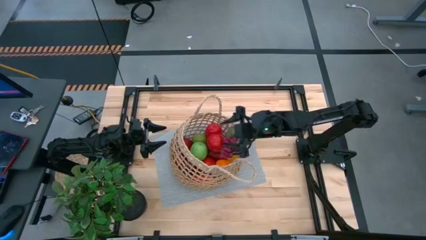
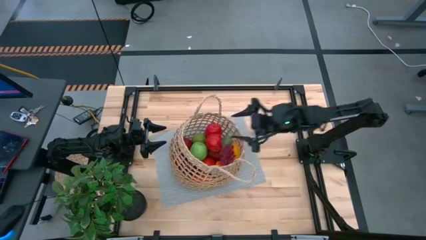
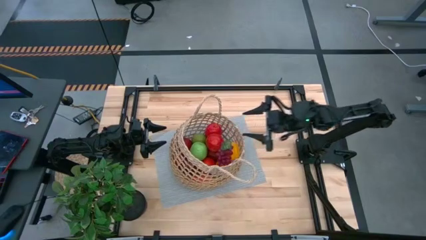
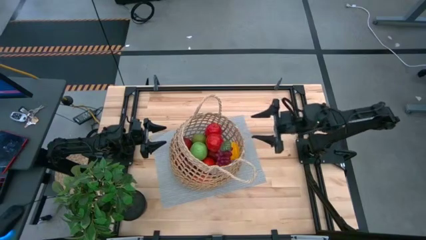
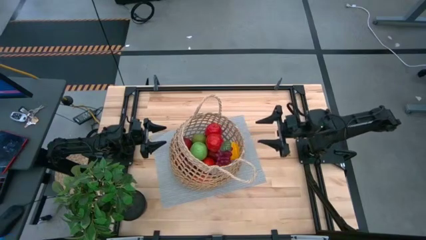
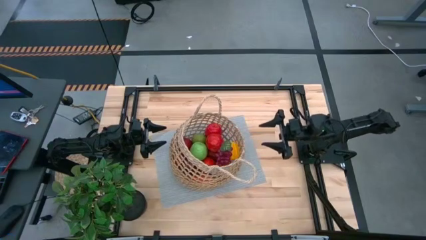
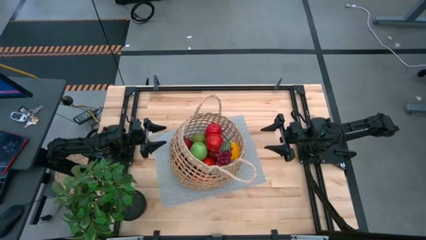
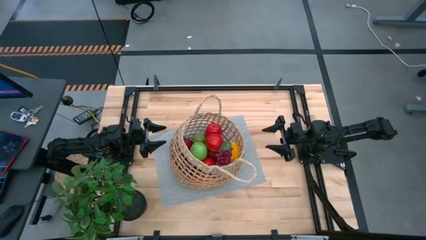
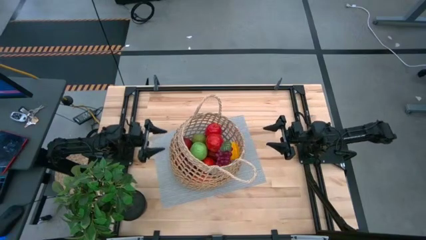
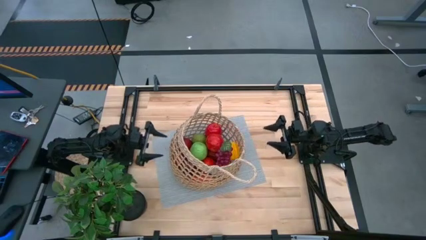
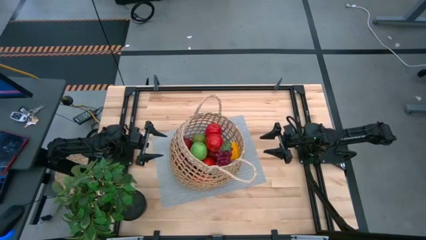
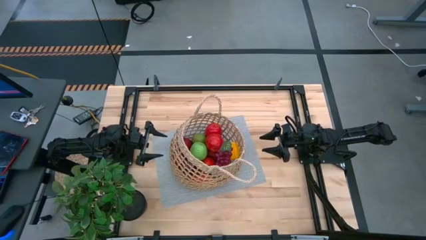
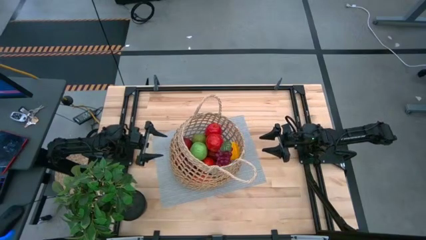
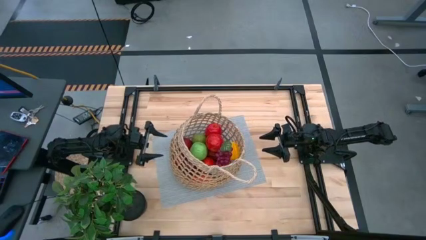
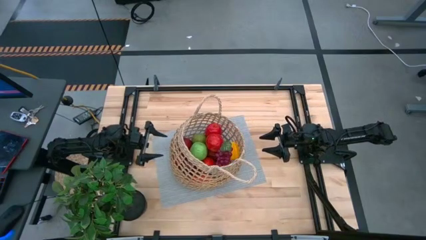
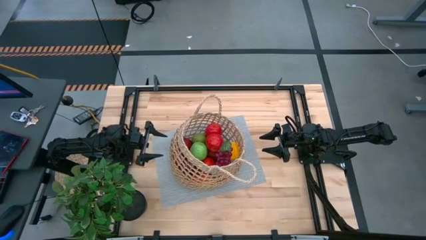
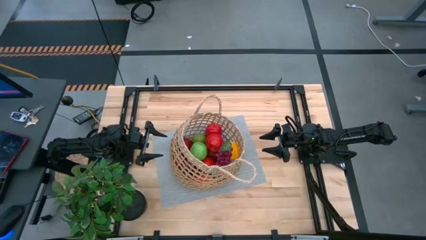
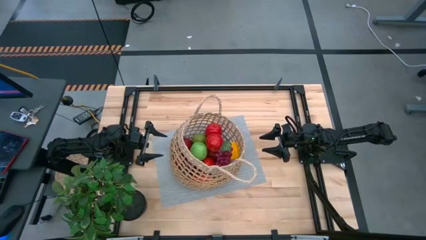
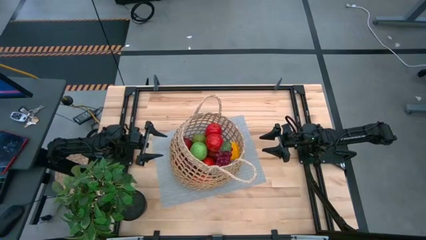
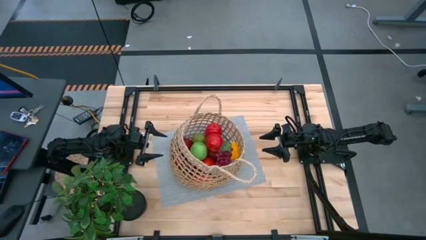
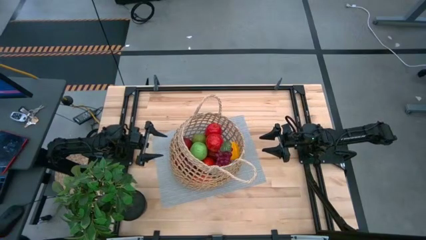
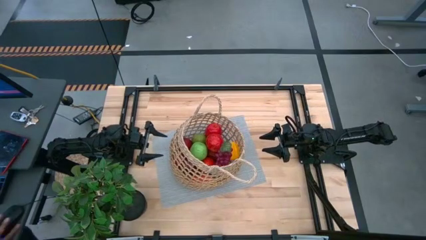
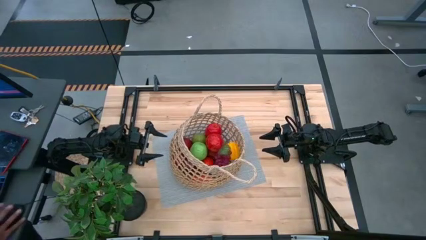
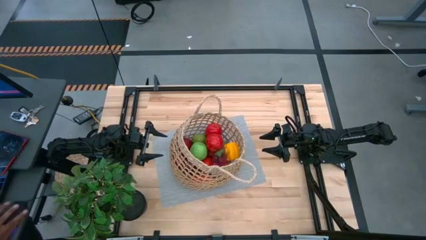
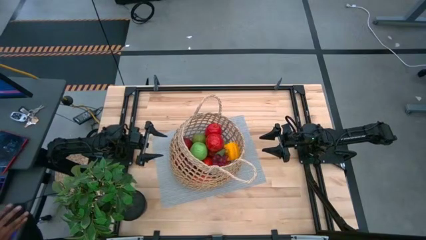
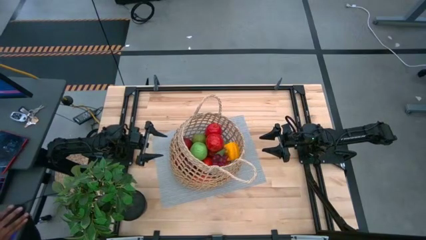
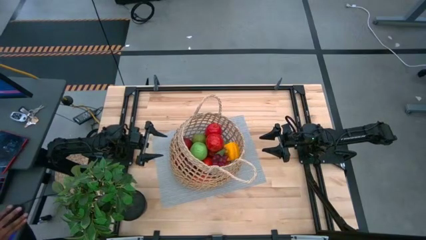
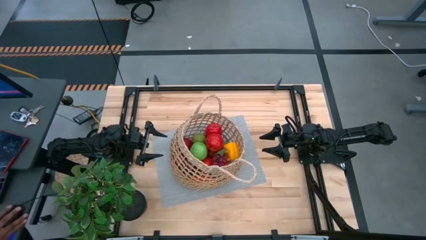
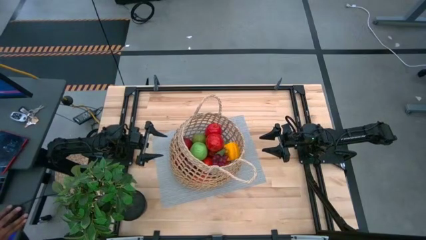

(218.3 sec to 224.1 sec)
Task: Build produce basket
Return to Home Position

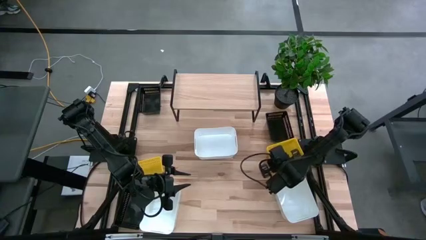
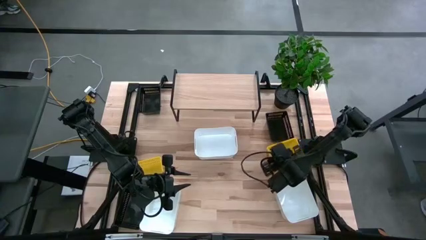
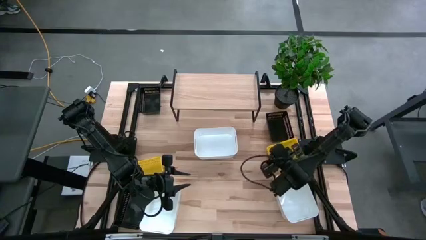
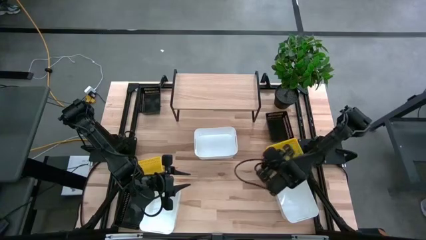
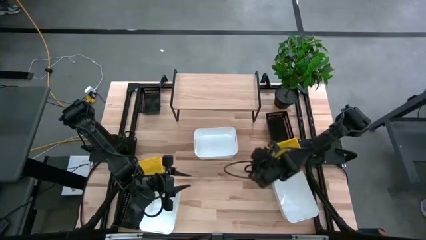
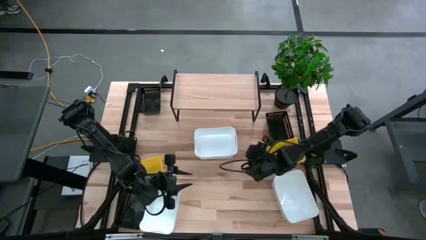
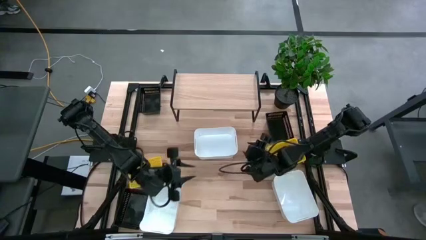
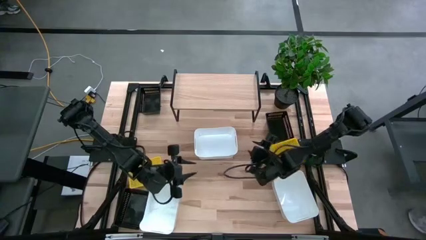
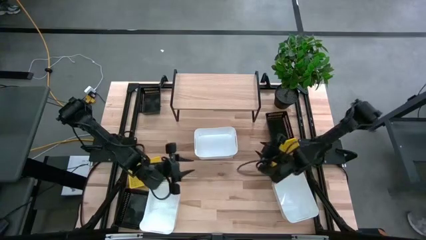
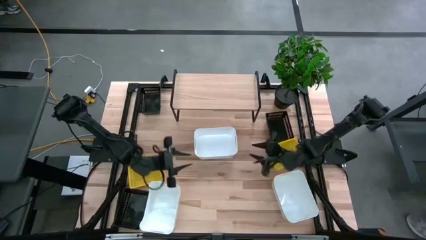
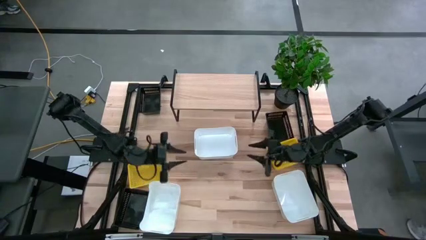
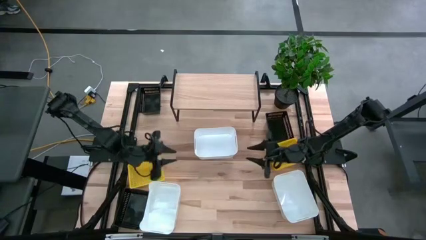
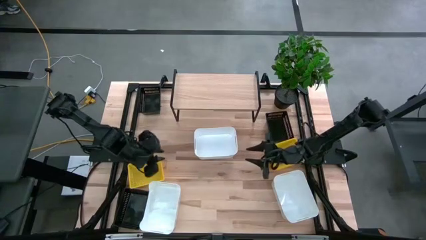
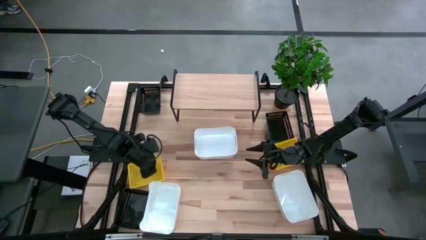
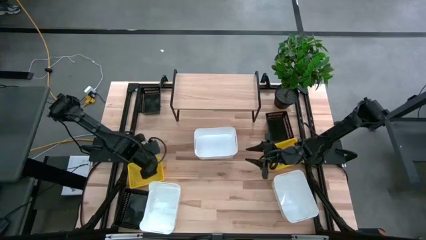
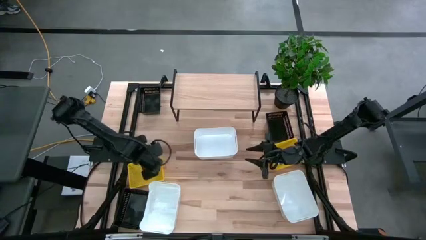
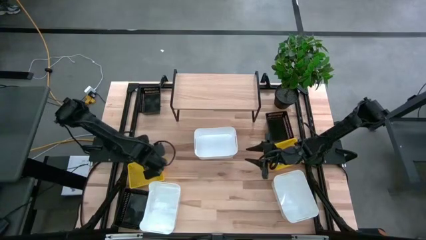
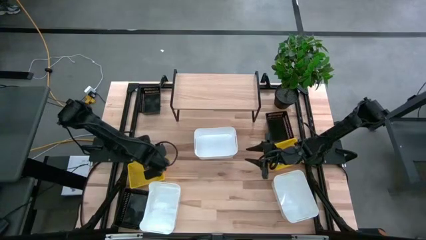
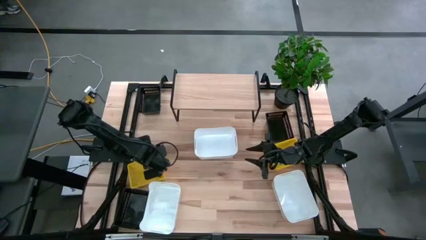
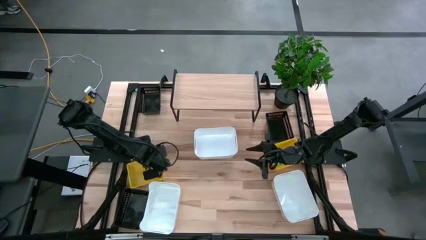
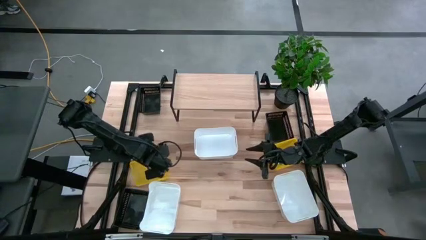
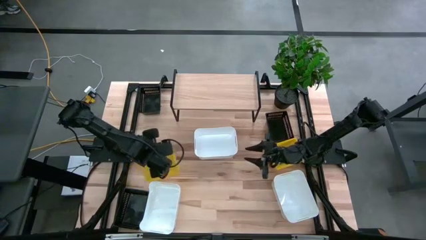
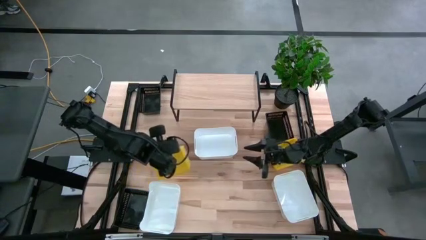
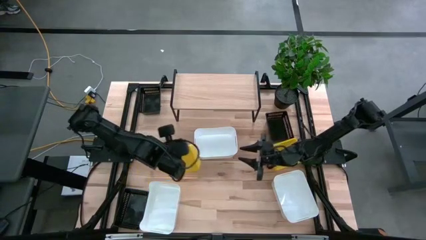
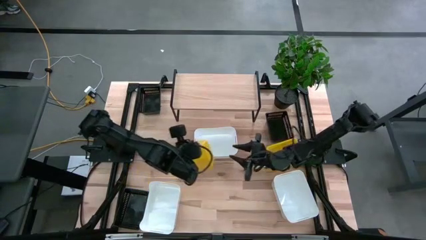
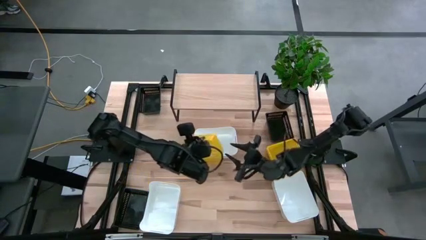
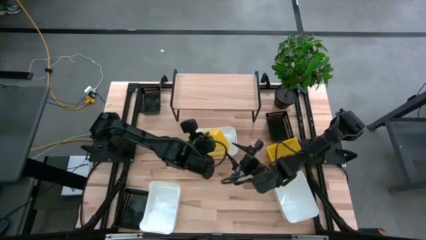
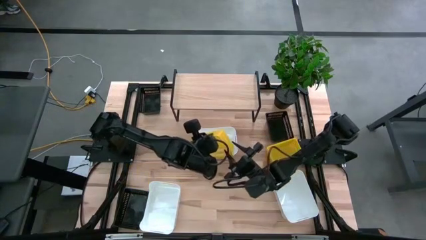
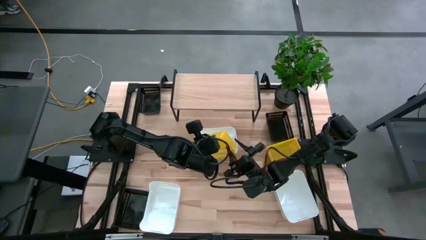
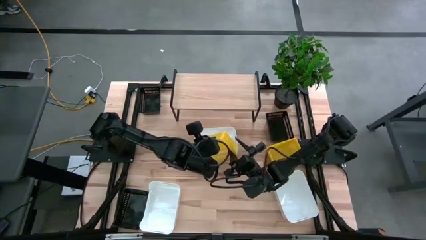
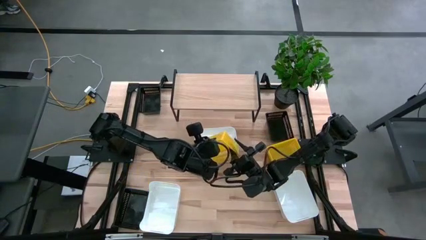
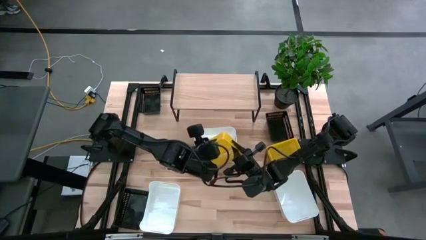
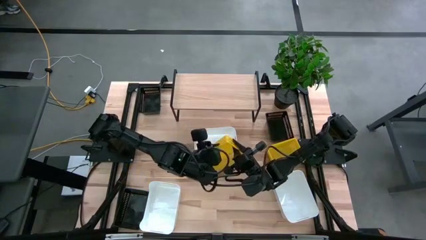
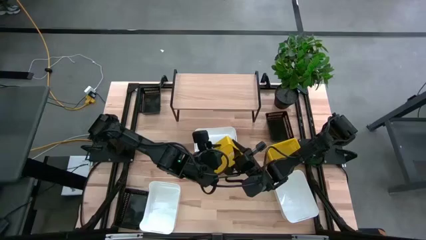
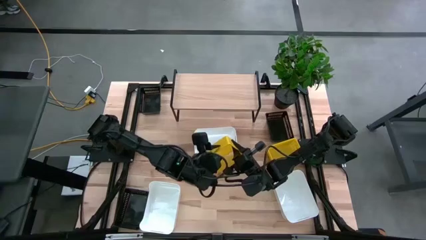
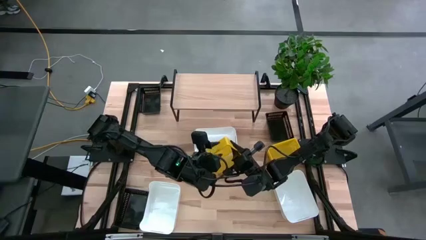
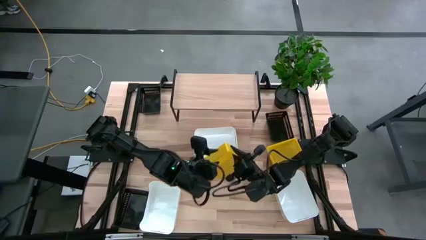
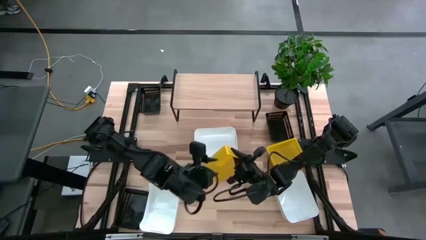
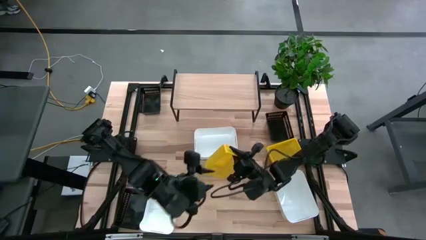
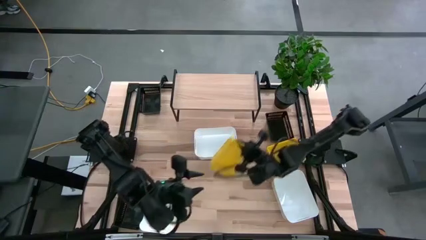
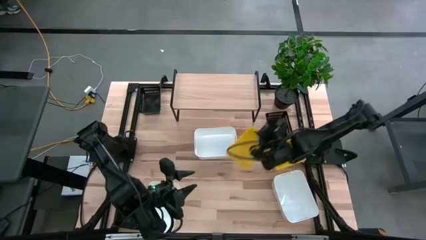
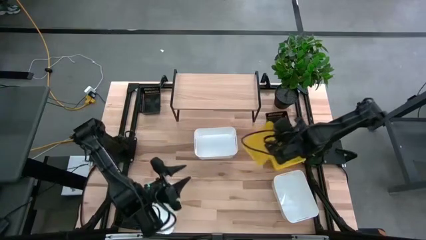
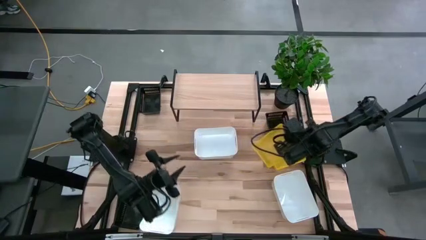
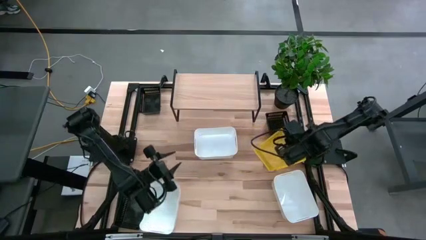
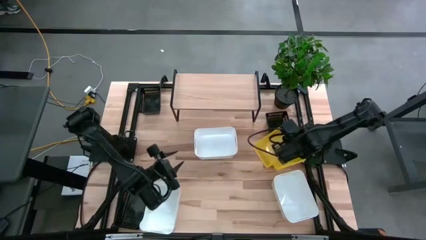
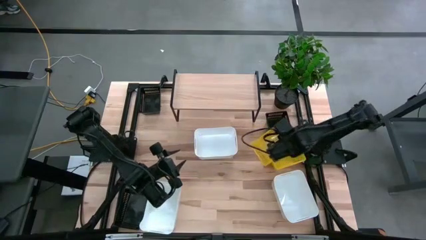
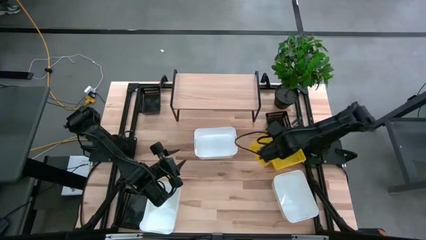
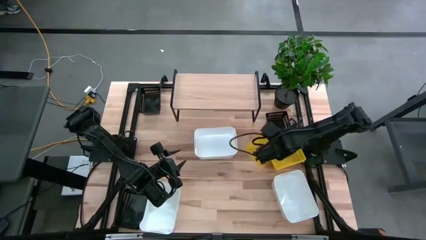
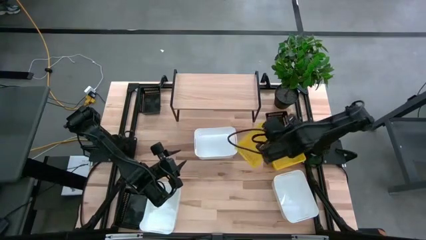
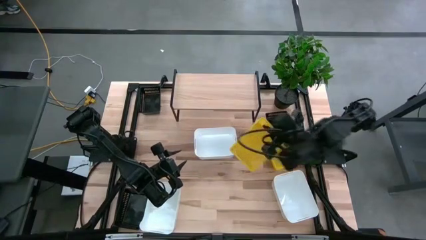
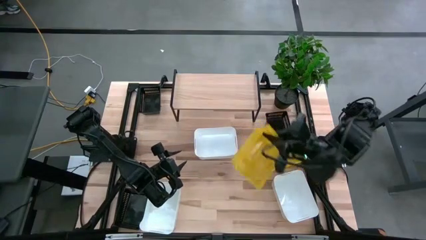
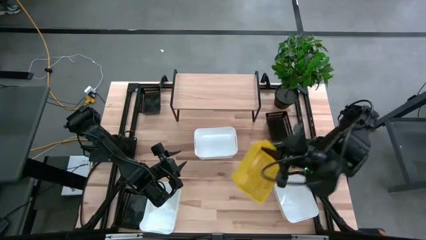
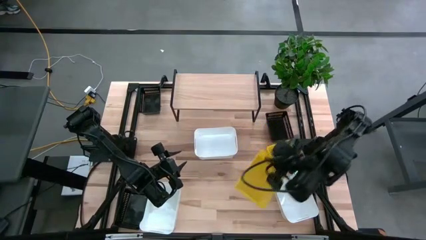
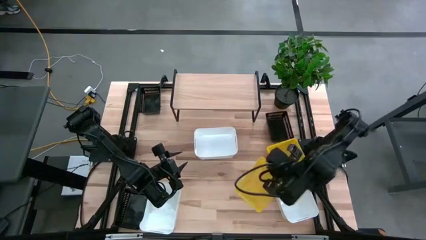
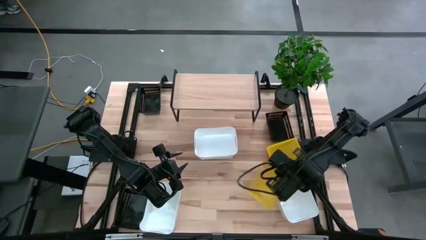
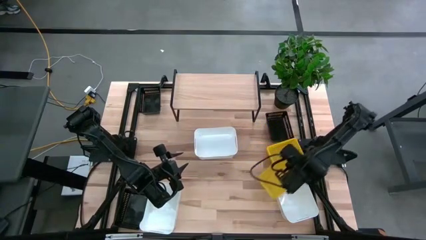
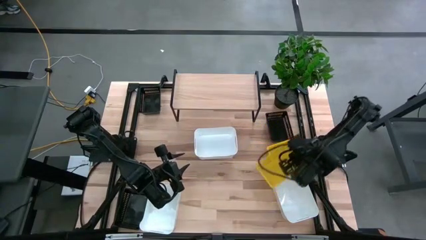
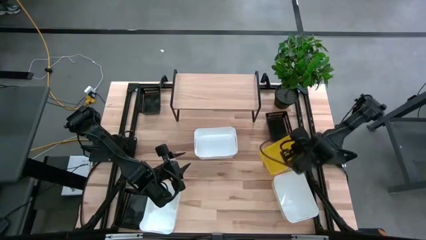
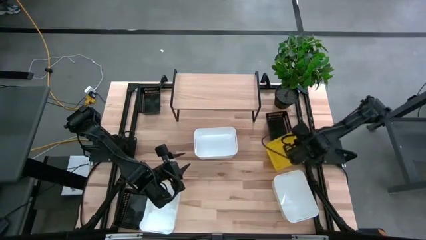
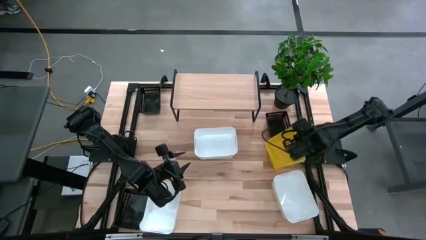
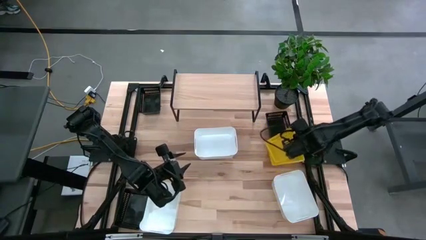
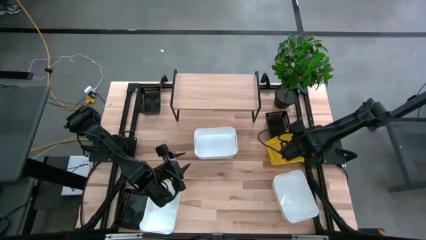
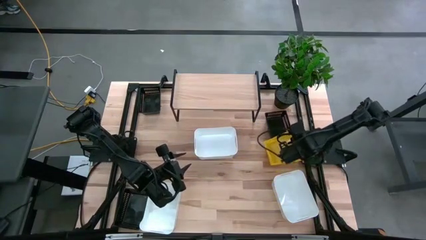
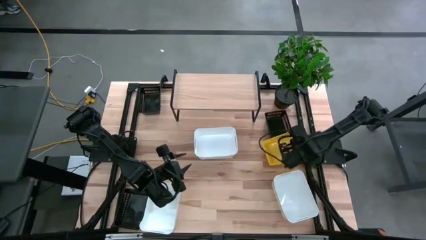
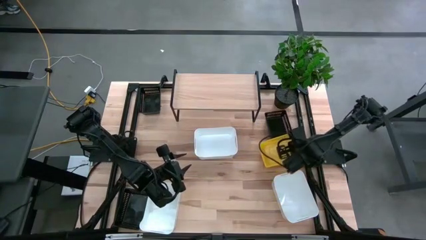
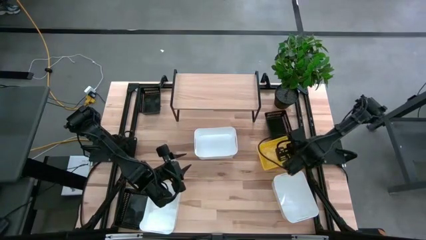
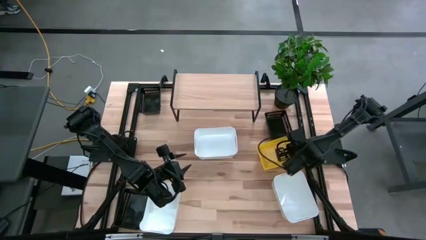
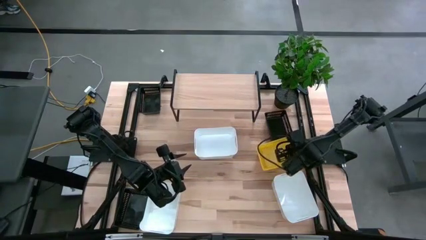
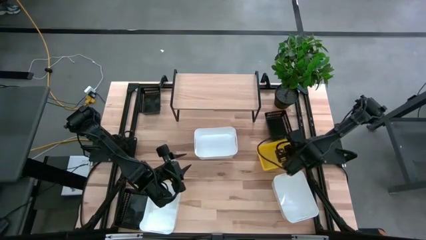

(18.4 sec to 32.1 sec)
Task: Stack baskets on shelf by color
Stack the yellow bin on top of the stacked yellow bins
